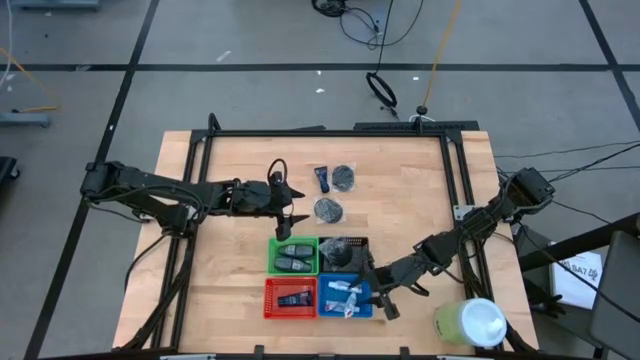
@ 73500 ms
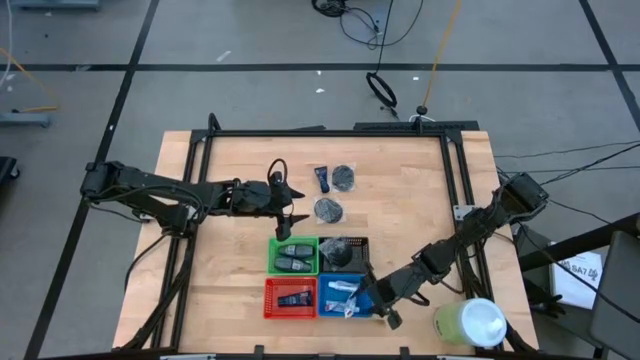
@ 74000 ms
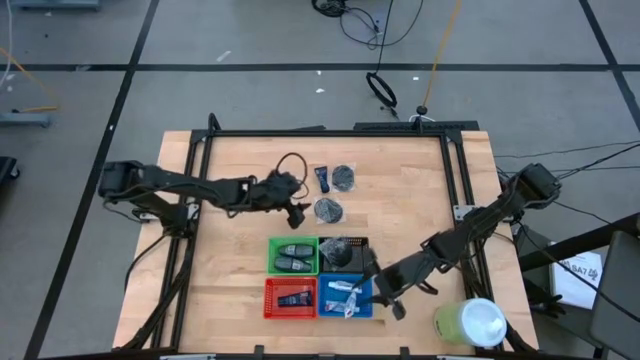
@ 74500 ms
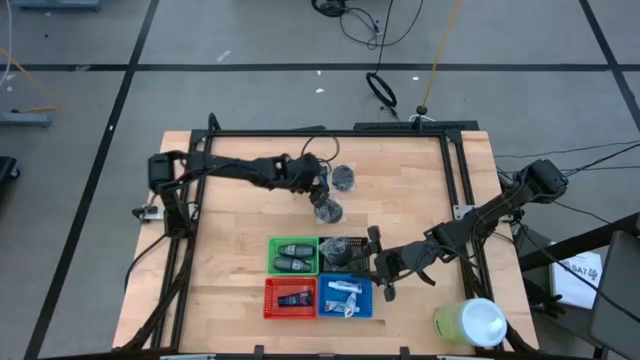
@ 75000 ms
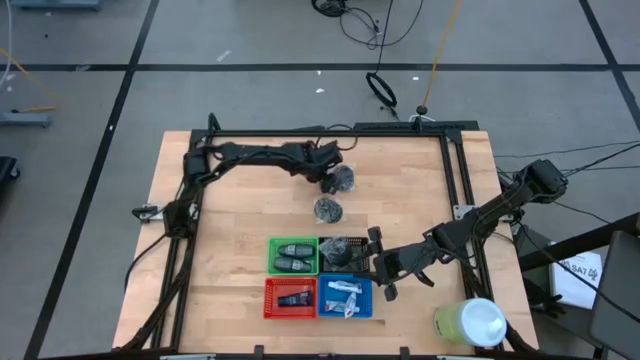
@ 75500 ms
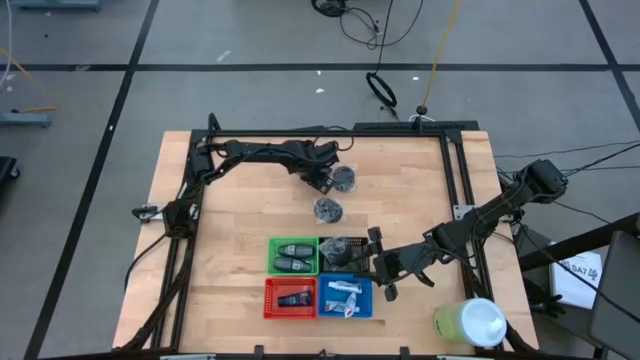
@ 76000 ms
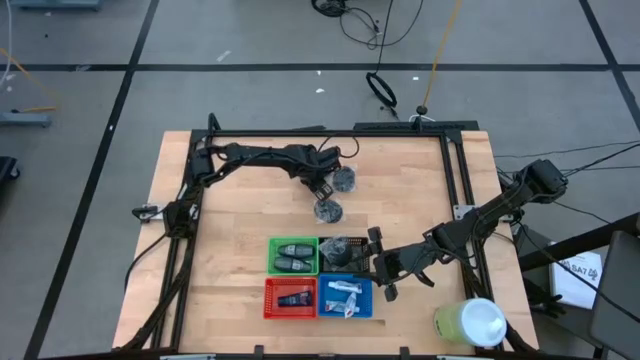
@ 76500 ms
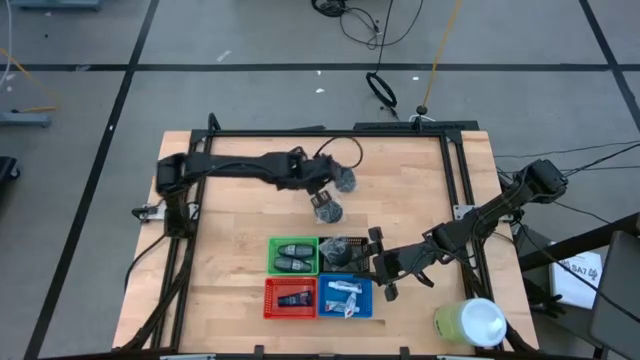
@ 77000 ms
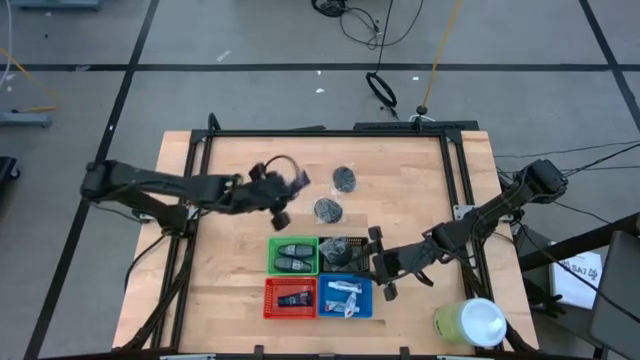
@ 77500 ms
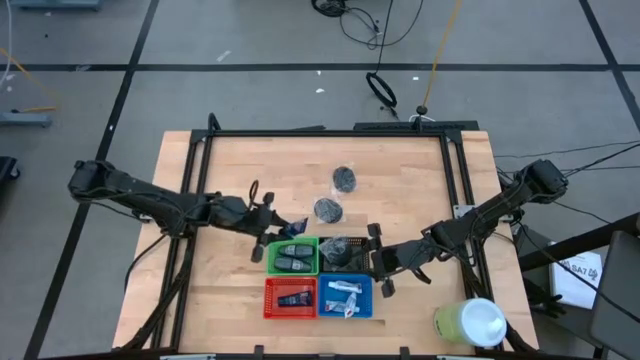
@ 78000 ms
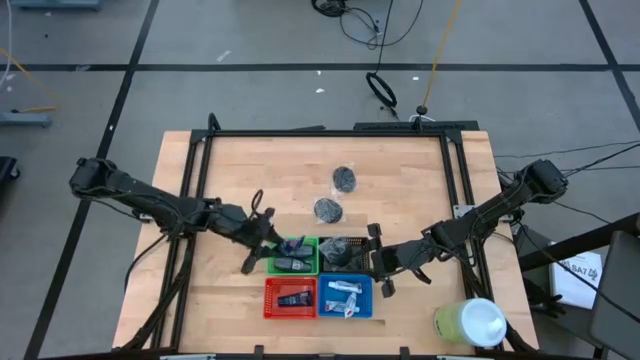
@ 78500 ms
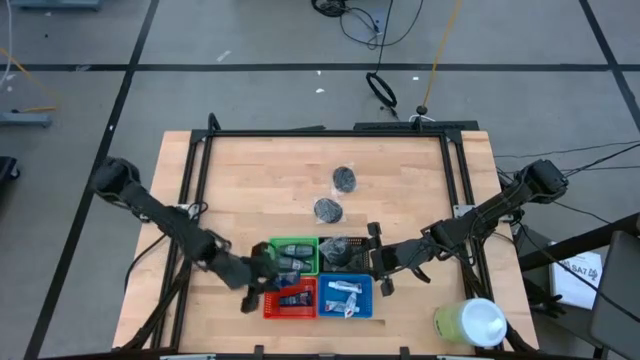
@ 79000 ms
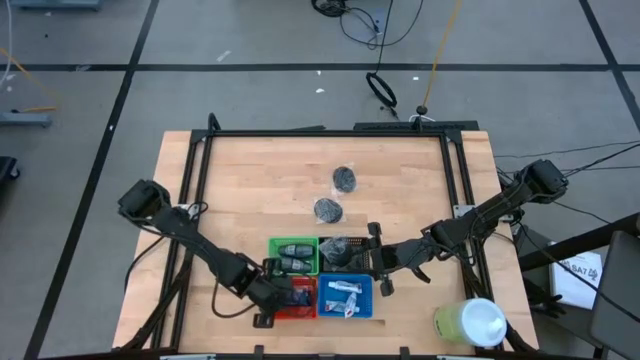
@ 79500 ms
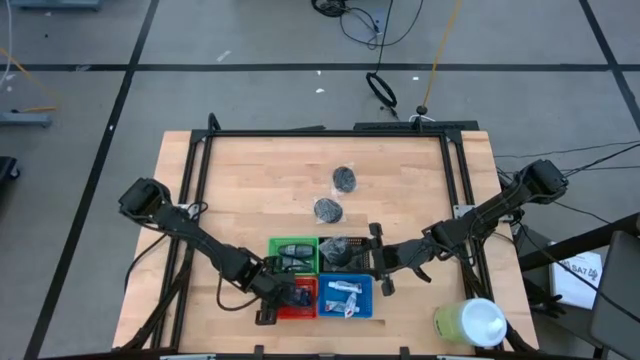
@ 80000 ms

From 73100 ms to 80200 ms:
Task: Pick & Place Travel size toiletries
Put the blue shave cream into the orange bin

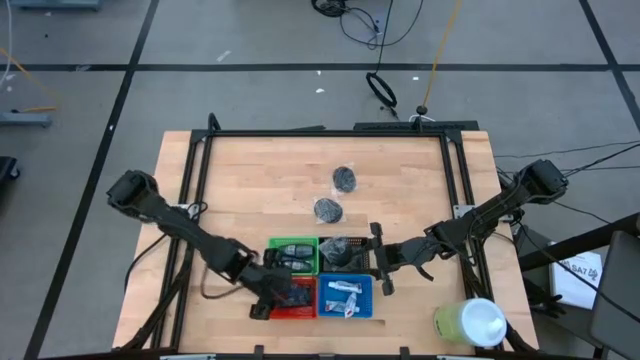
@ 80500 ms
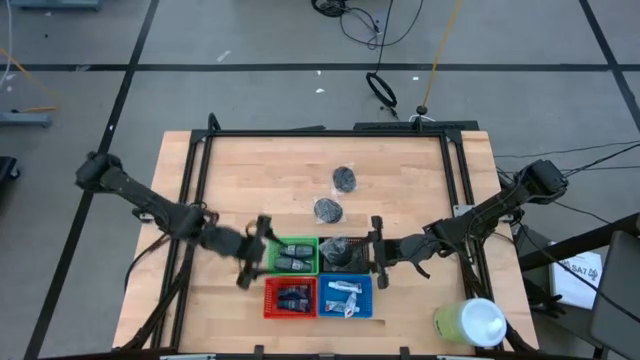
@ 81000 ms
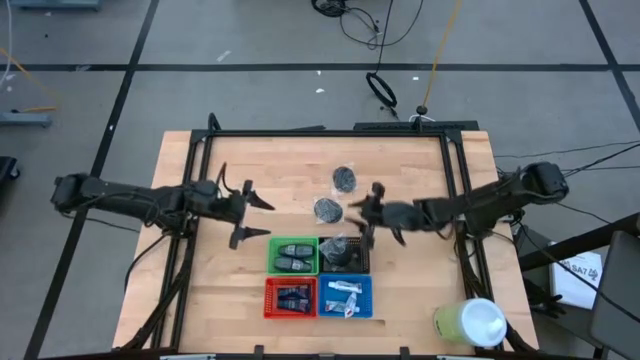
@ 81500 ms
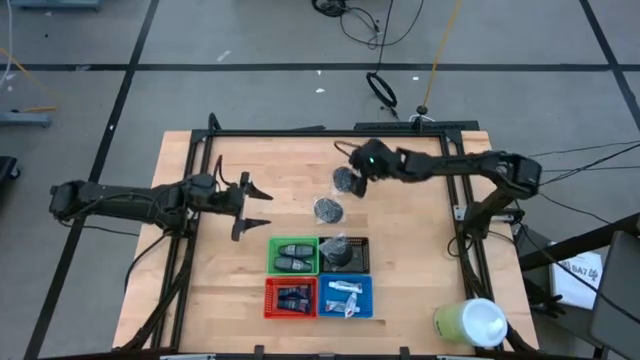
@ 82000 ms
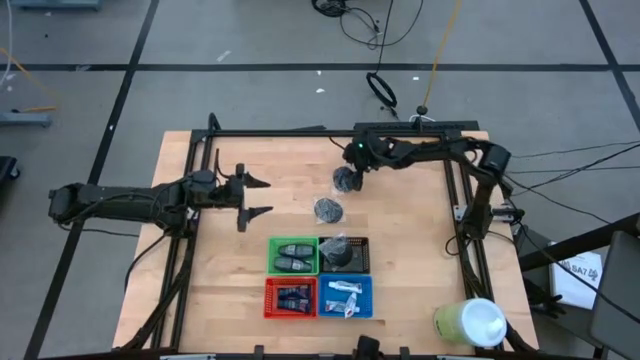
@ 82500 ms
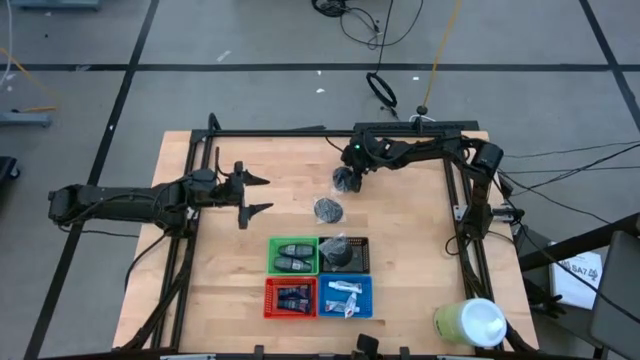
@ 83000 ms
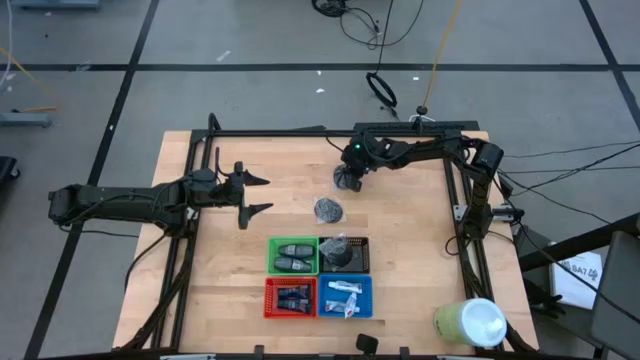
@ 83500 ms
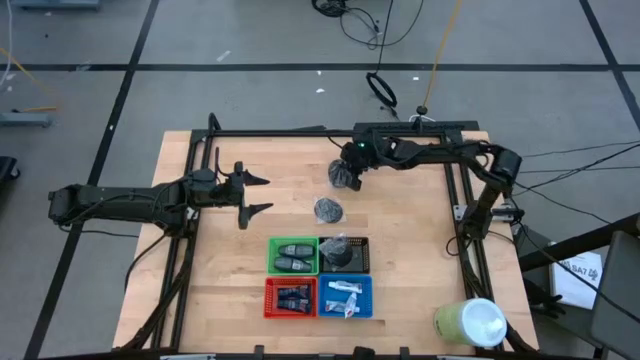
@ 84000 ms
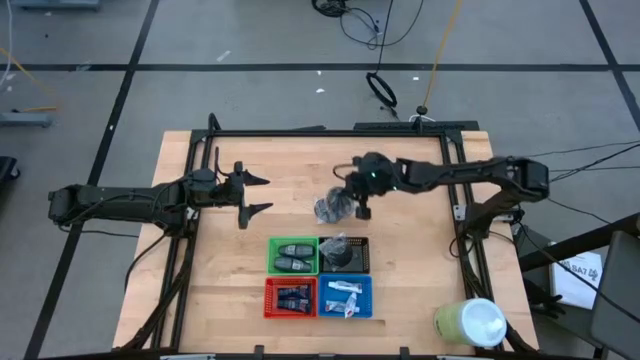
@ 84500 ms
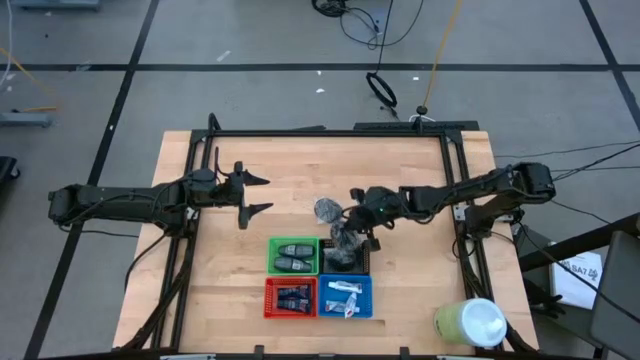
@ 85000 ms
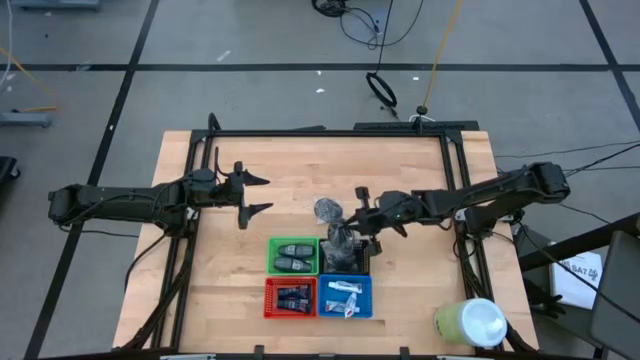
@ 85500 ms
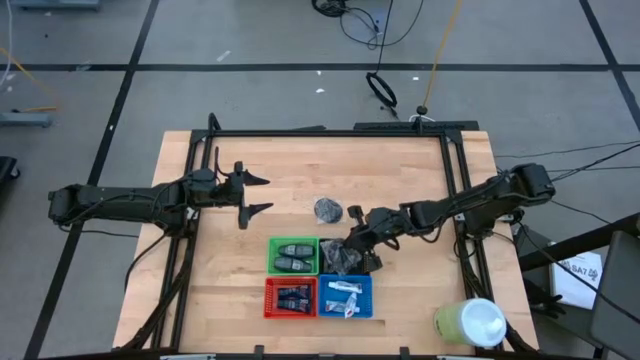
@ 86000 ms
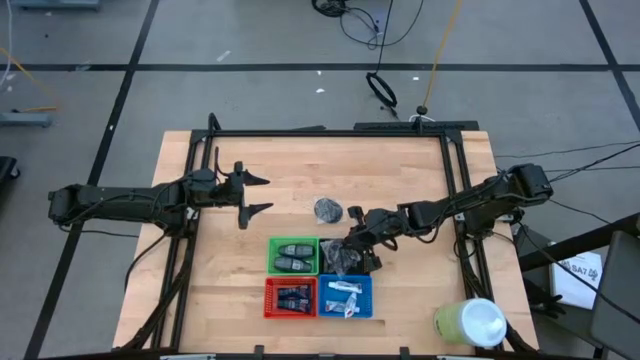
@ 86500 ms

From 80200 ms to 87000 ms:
Put the top black hairbrush into the black bin

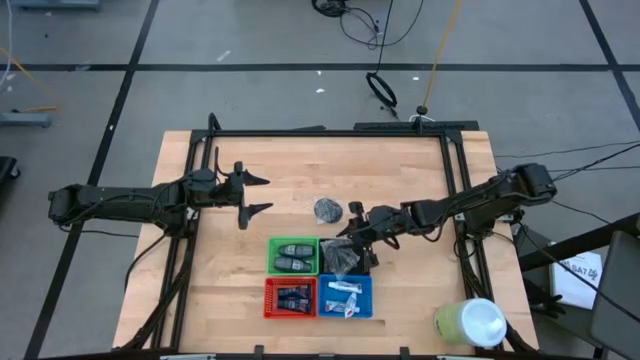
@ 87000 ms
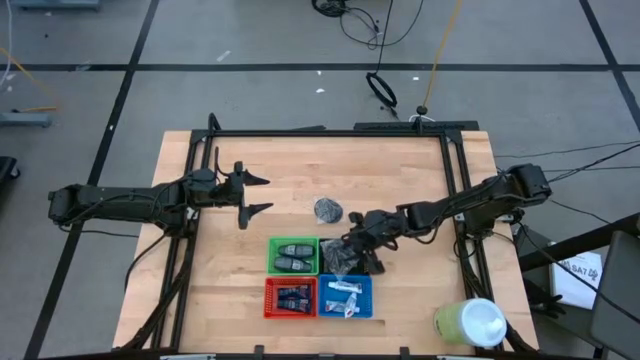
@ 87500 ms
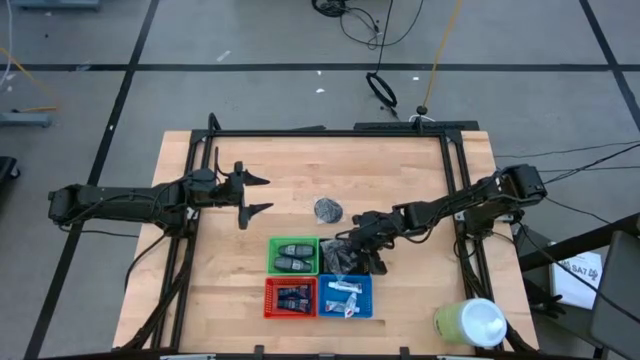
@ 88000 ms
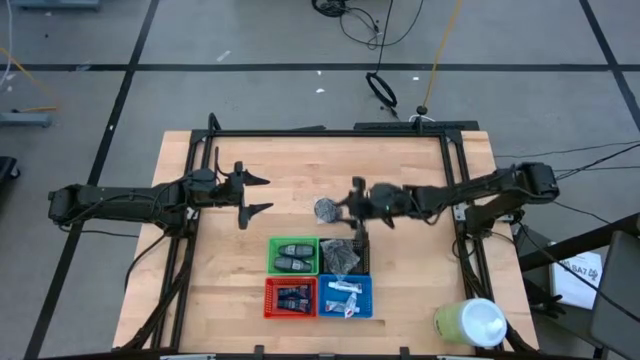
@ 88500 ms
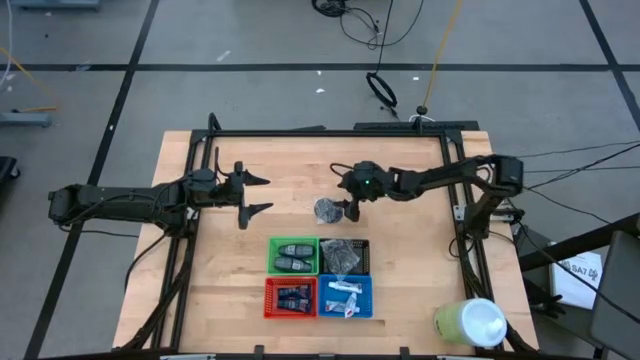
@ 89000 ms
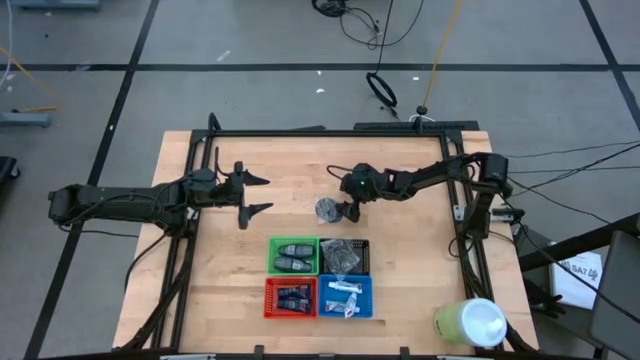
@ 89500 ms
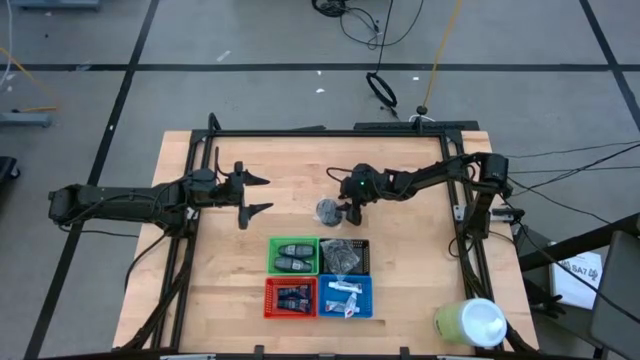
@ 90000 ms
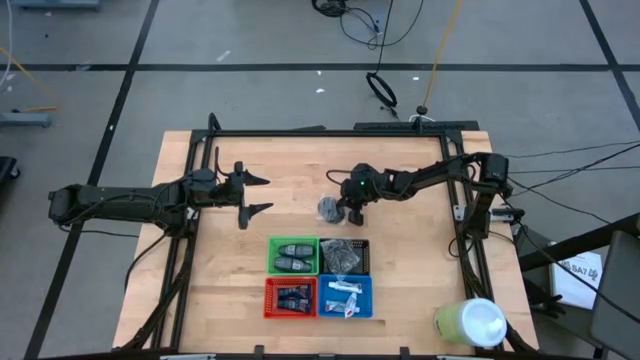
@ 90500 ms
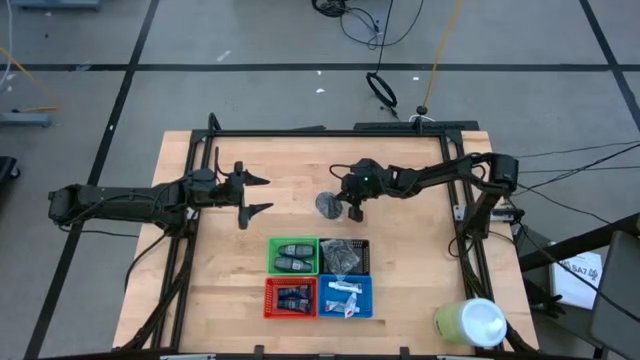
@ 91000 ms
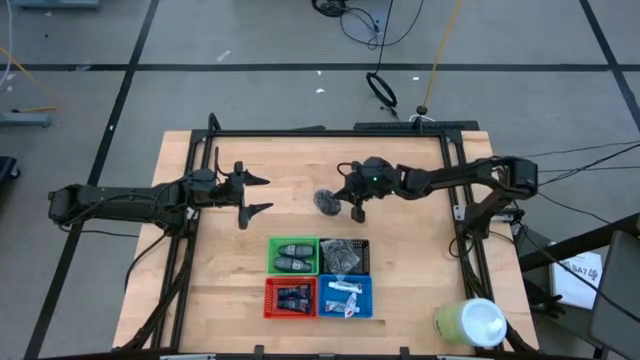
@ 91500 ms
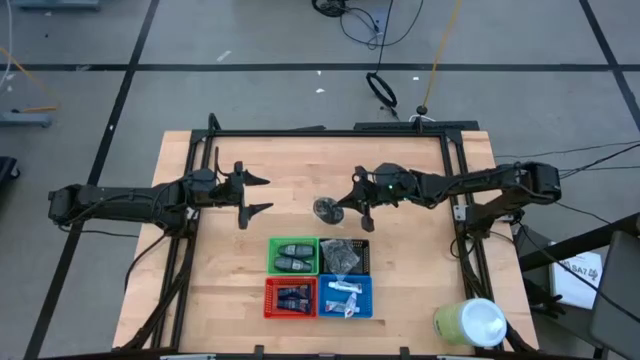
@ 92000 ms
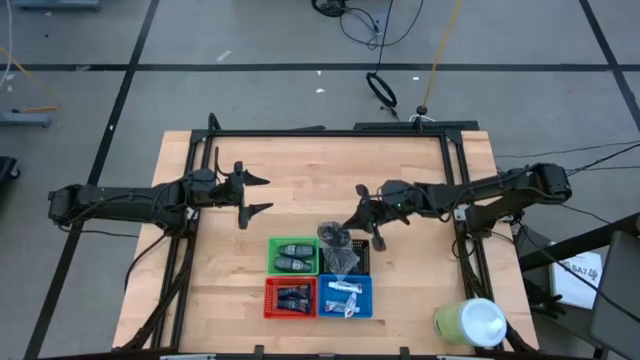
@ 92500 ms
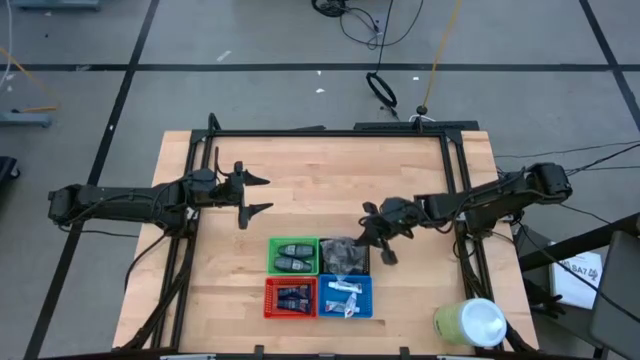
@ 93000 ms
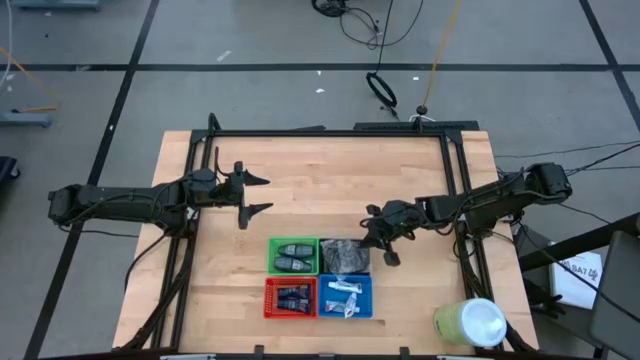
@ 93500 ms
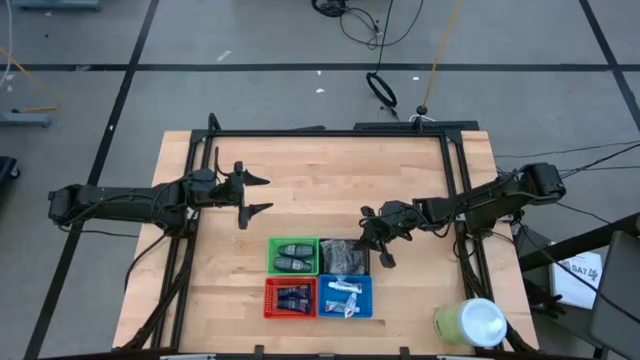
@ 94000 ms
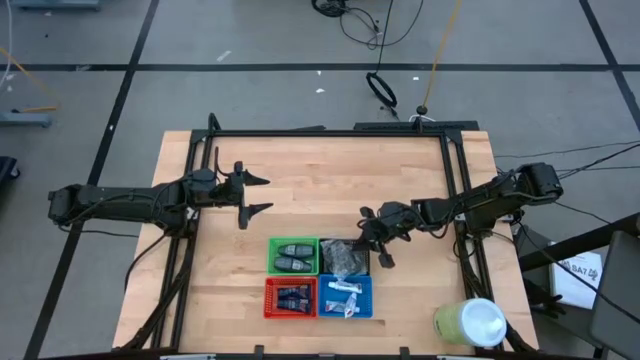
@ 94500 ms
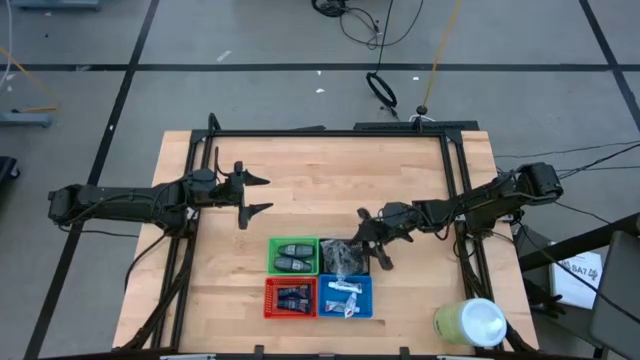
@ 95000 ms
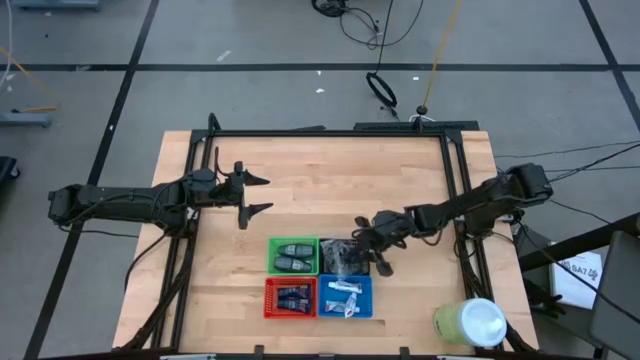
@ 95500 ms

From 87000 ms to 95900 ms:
Put the black hairbrush into the black bin
